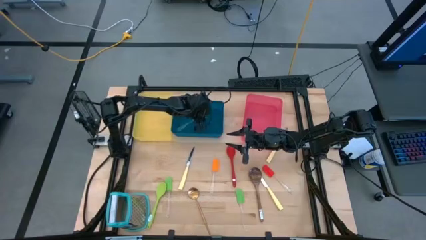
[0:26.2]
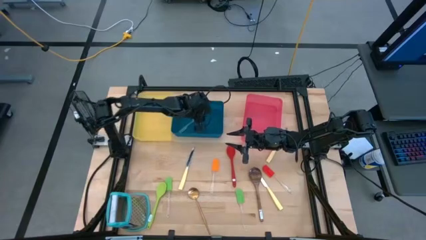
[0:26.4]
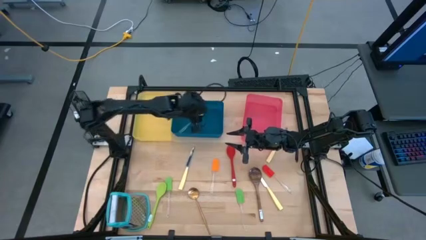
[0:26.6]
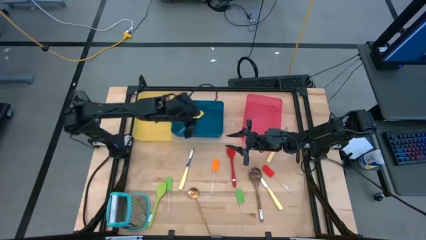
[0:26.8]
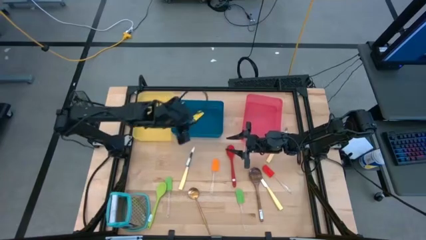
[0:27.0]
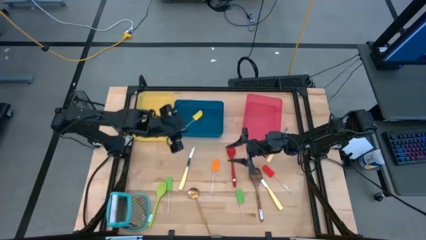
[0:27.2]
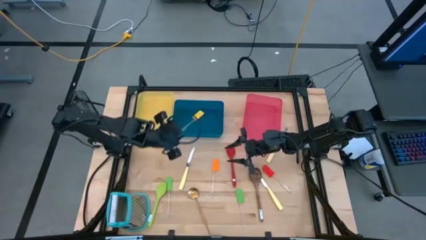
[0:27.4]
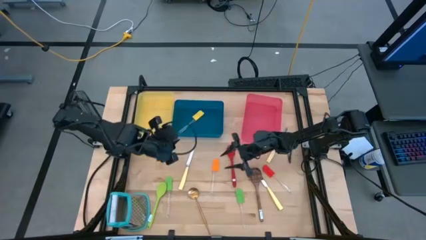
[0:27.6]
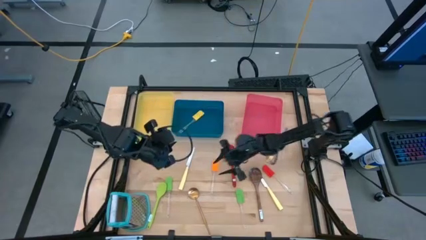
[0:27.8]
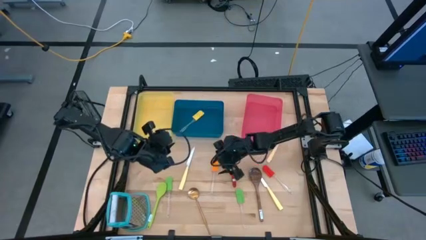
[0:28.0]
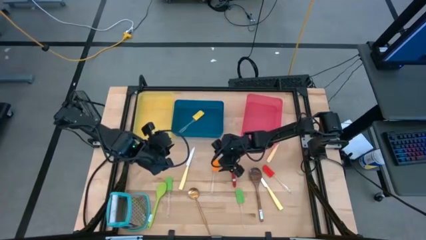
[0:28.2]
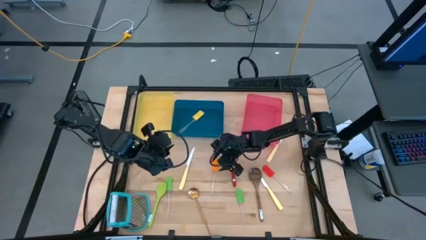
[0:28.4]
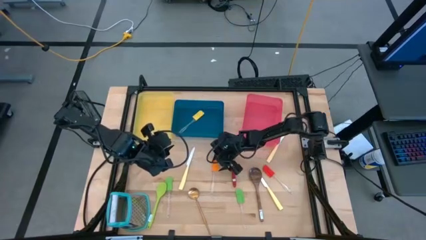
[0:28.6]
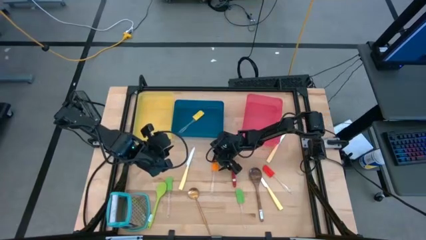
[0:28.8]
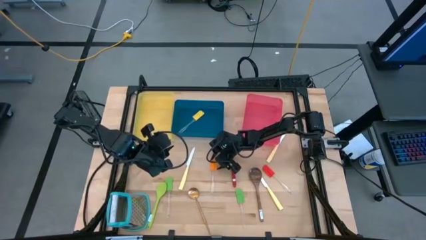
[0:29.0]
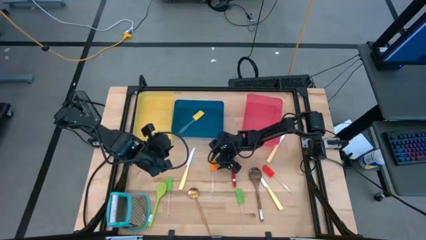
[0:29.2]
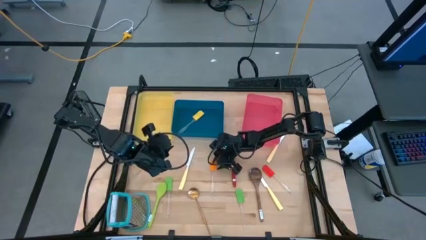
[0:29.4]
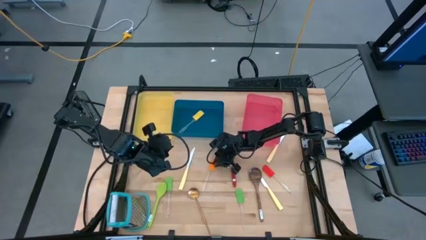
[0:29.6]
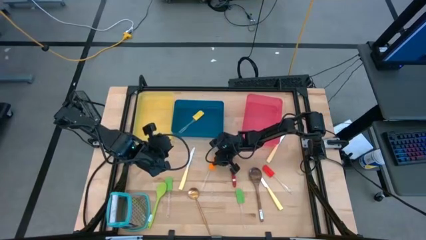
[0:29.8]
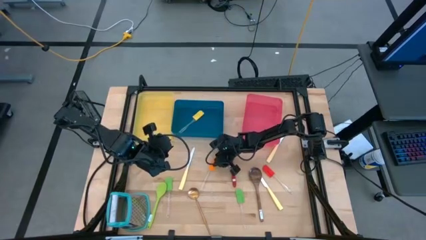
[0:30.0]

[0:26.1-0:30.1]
Task: Pick & Place Kitchen Items
Put the orange spatula into the blue bin

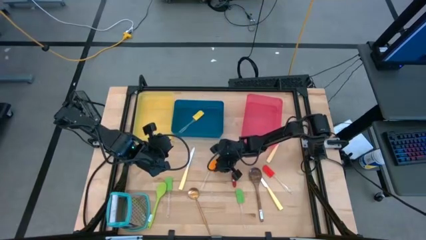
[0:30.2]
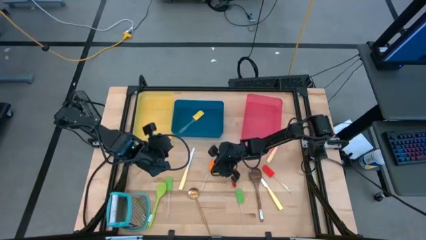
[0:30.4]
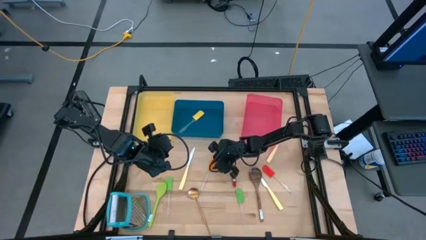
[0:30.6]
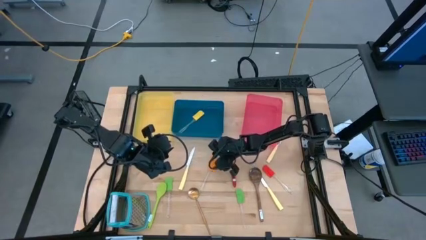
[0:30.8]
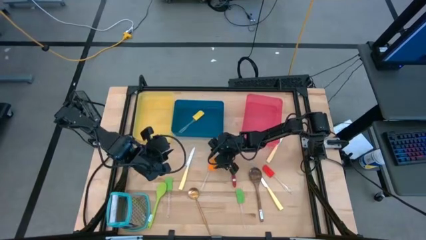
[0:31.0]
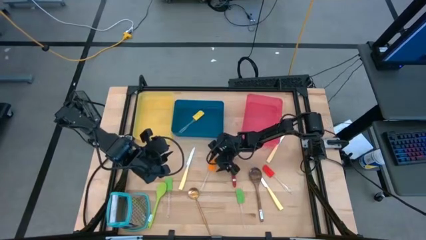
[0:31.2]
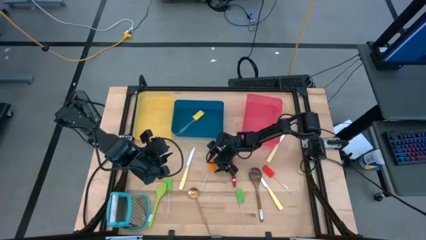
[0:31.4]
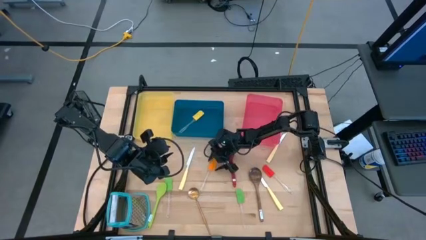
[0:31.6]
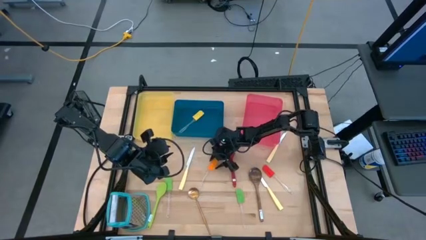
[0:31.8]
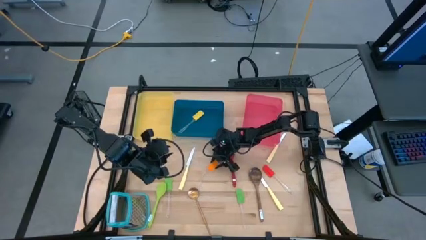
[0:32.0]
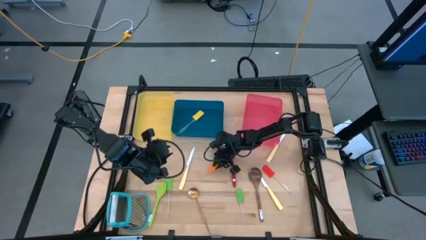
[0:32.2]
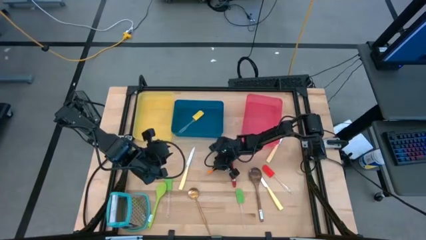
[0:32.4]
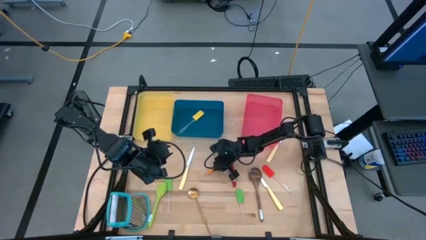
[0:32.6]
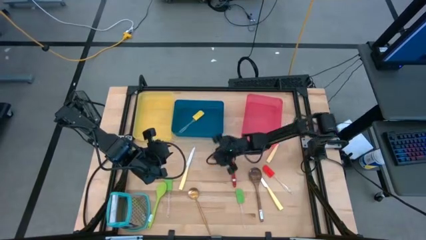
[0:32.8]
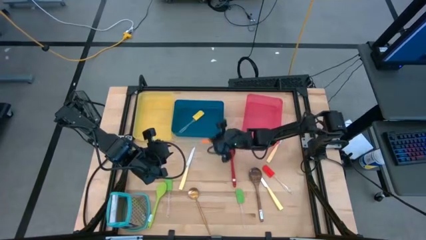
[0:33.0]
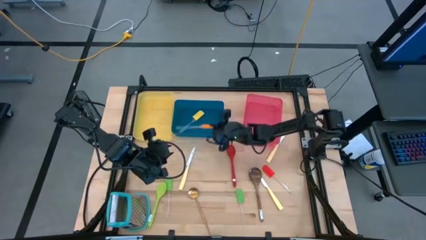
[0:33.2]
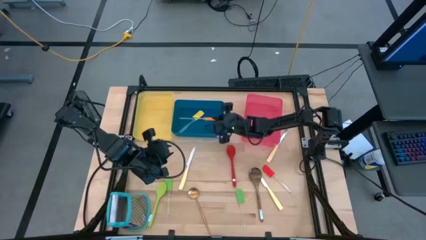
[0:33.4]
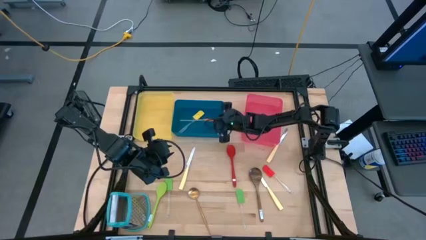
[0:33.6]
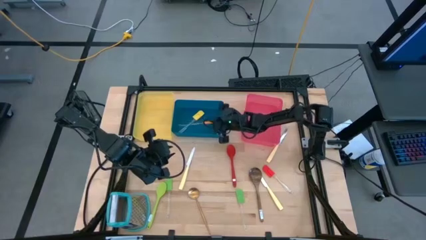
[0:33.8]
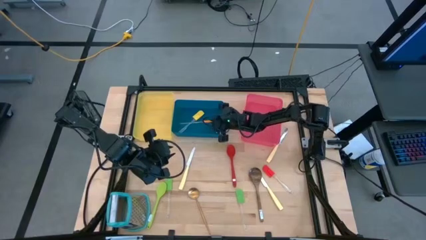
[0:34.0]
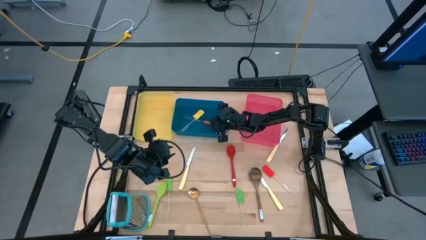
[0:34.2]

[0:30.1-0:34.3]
Put the orange spatula into the blue bin

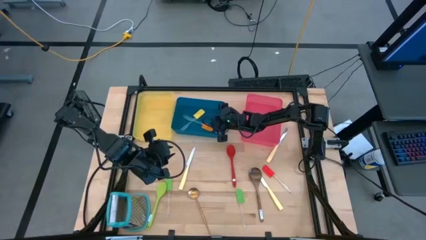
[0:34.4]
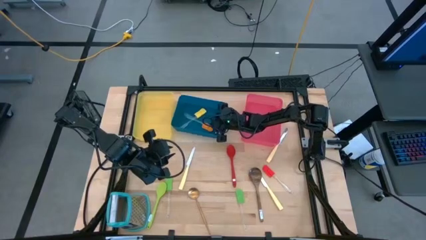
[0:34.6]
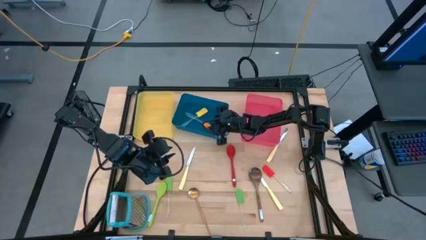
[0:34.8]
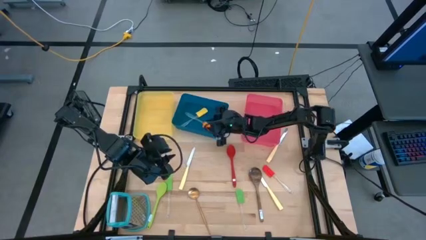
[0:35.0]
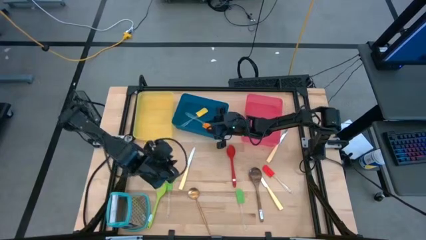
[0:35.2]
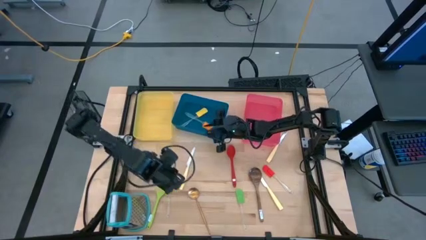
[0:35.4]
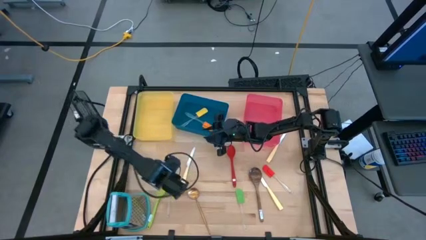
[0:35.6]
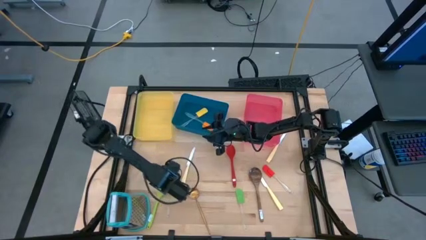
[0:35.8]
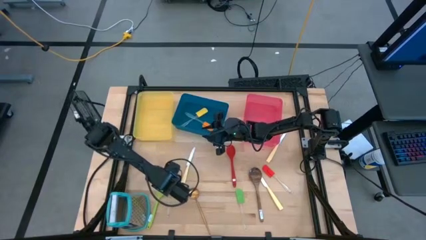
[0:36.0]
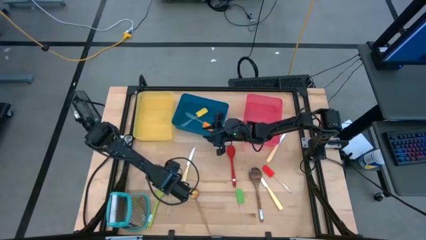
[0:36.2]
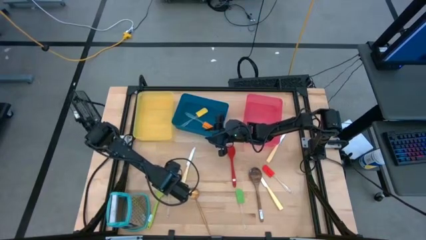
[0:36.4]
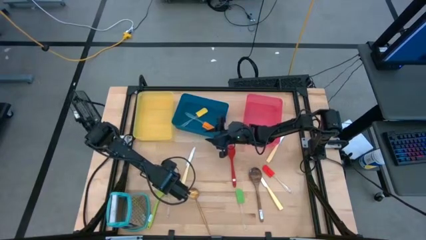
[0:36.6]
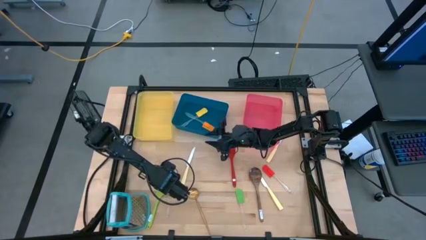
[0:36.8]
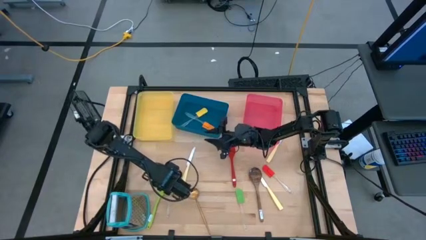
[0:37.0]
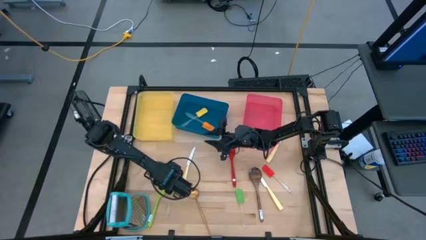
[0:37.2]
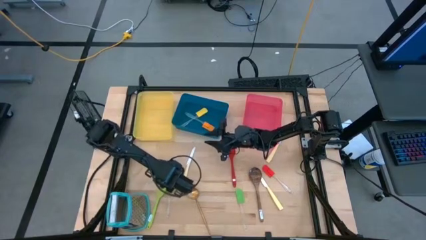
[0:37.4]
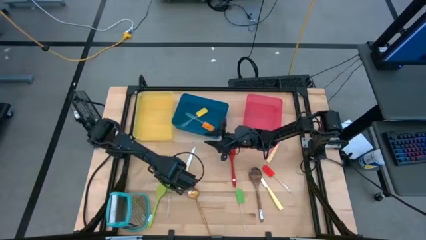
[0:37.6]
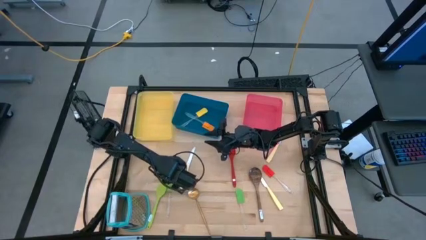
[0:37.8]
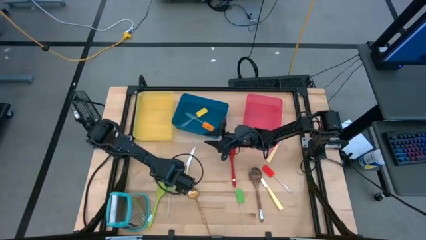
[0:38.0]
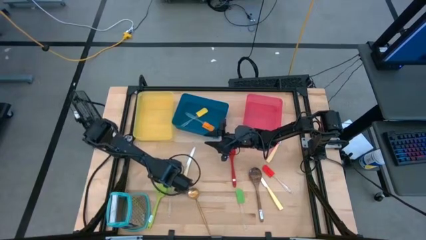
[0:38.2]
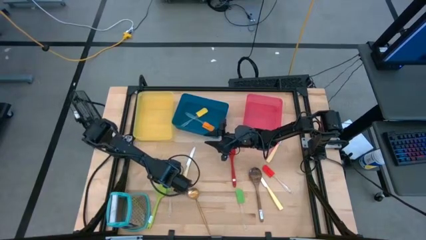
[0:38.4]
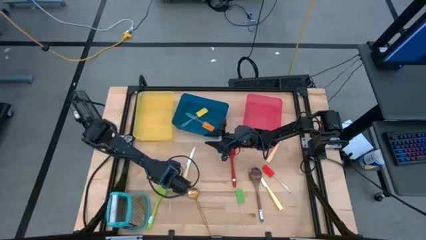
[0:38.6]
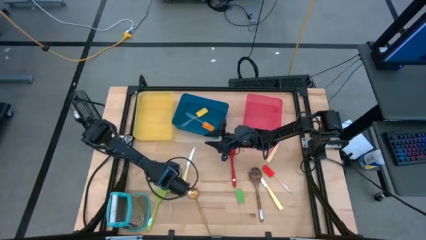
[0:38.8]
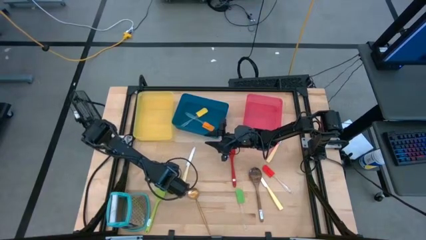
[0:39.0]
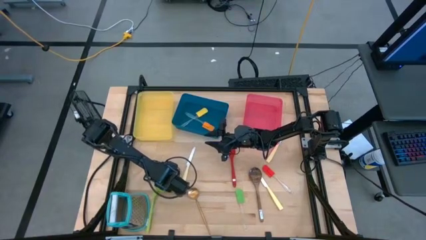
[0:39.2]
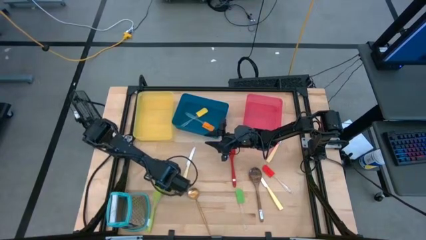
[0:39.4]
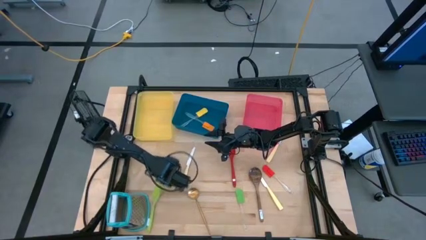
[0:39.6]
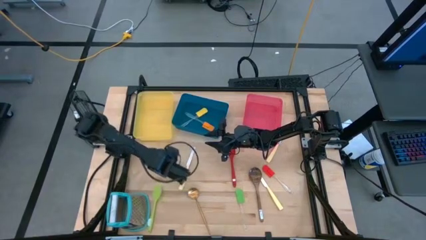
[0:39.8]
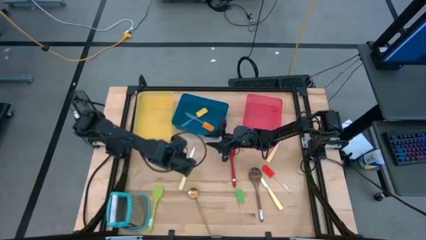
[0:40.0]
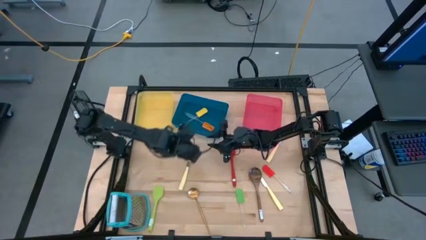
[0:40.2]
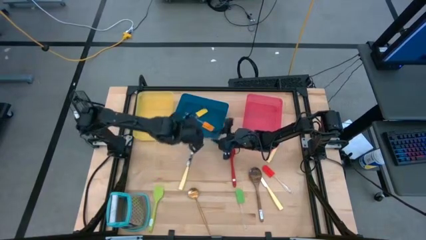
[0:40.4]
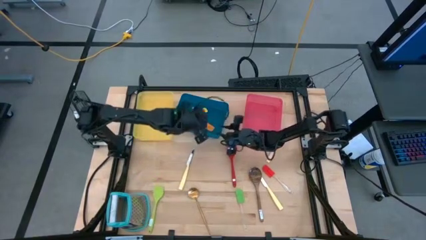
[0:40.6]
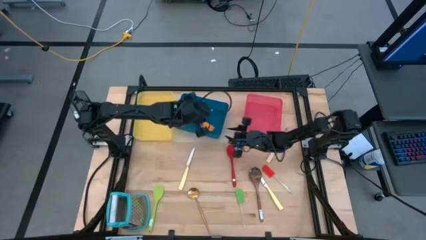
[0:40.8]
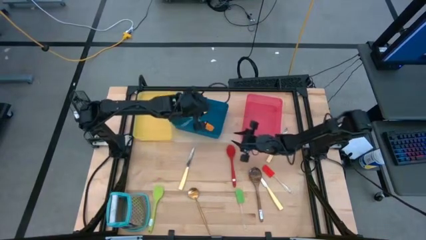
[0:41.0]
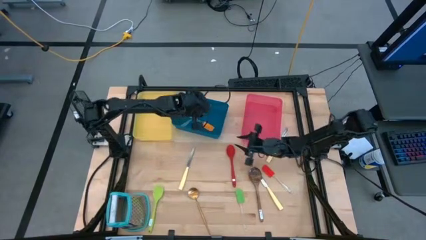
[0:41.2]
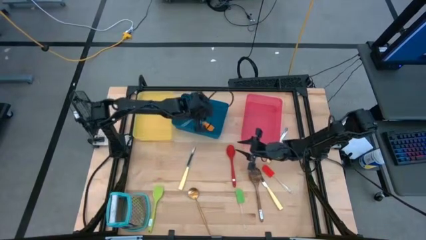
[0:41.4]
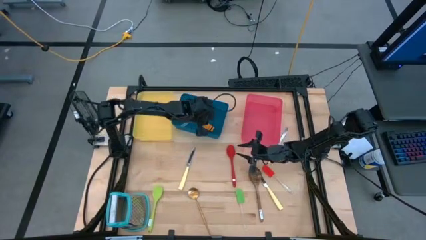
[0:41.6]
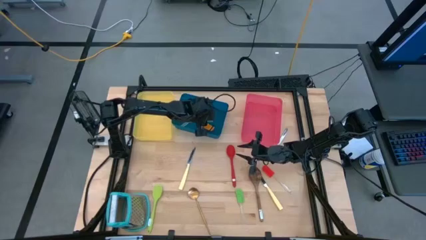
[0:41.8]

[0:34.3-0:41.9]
Put the left green spatula into the blue bin

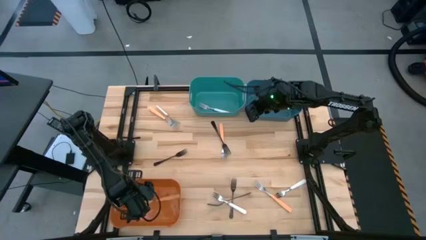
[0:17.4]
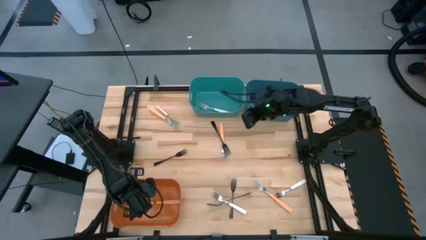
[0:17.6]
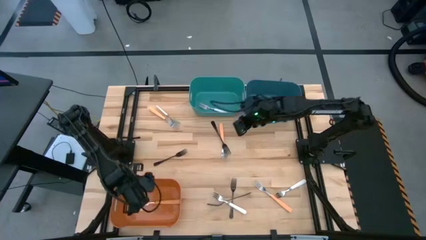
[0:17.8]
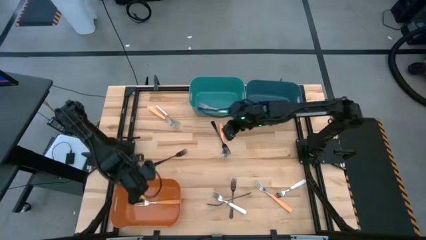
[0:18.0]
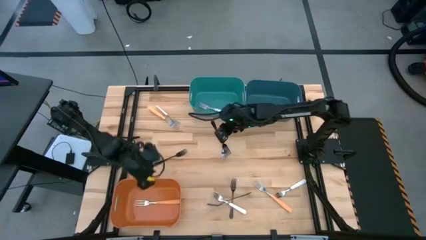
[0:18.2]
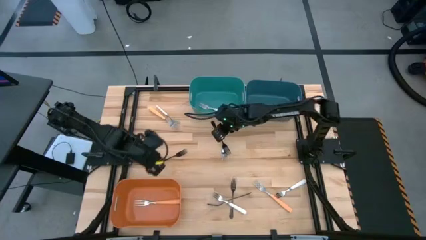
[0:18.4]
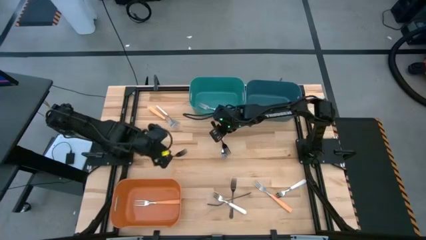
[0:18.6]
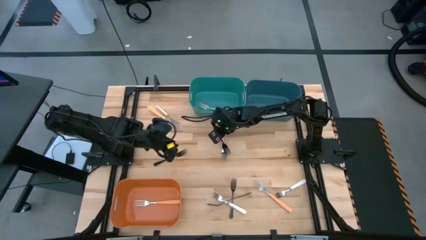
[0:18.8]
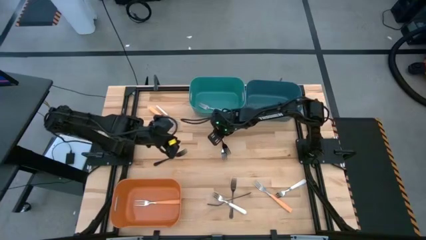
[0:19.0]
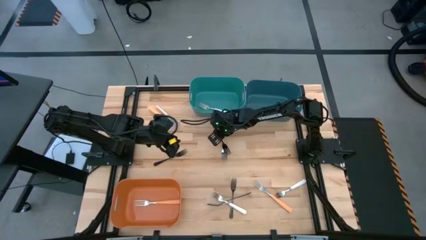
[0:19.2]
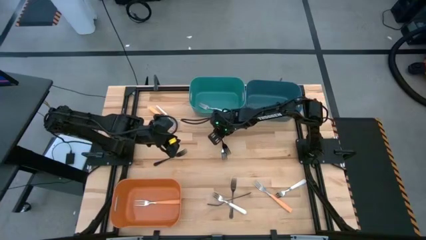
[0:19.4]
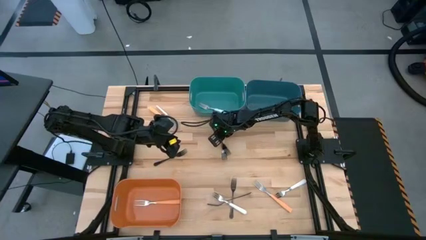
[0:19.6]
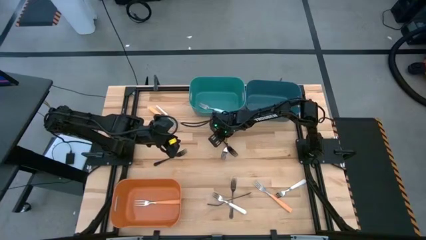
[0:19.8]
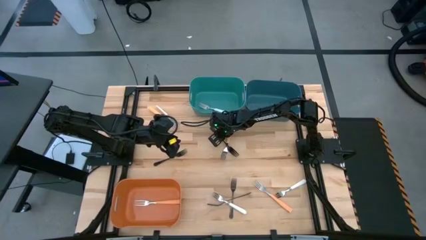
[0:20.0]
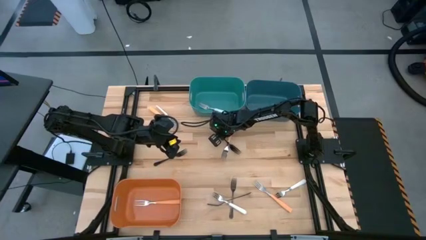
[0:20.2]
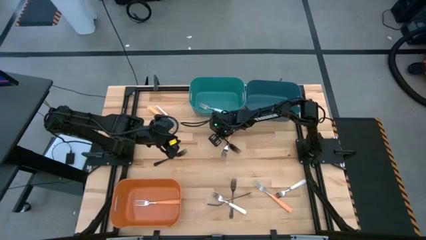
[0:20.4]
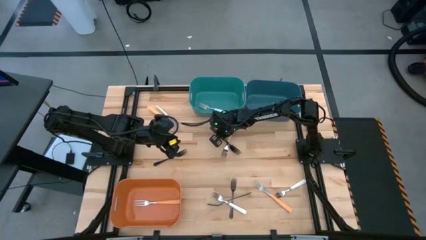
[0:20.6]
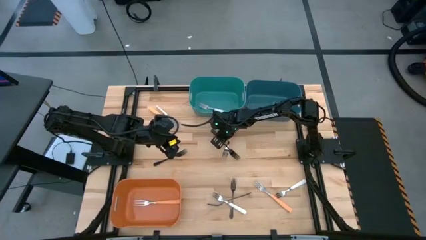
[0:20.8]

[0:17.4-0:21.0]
Task: Sort silverware by color (type)
Put the top black fork into the blue bin
